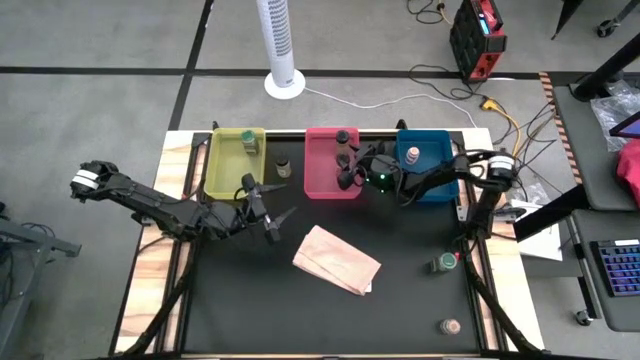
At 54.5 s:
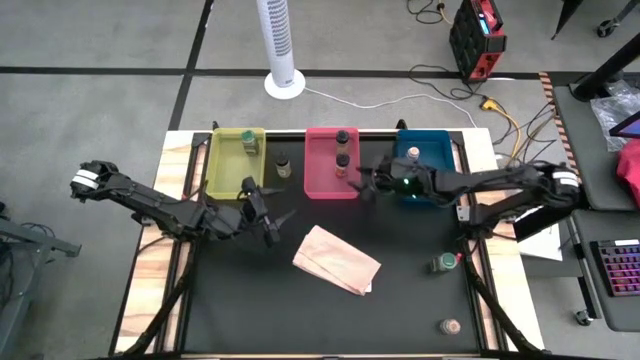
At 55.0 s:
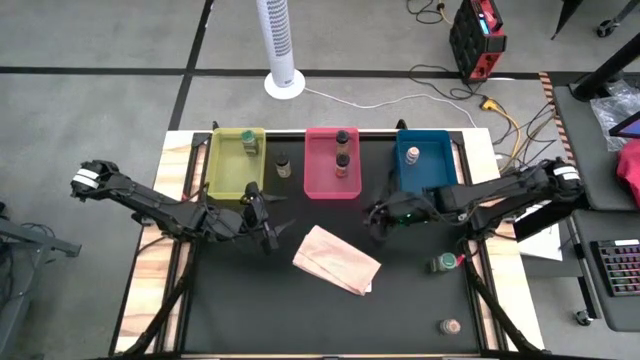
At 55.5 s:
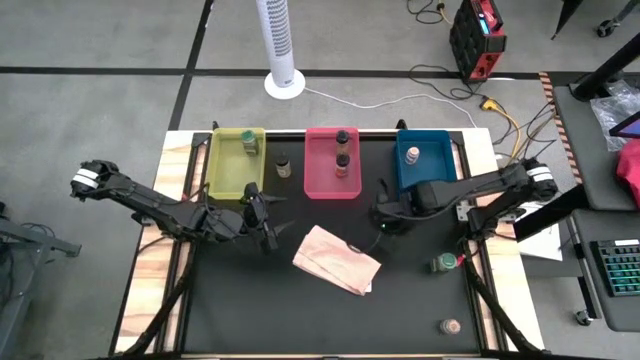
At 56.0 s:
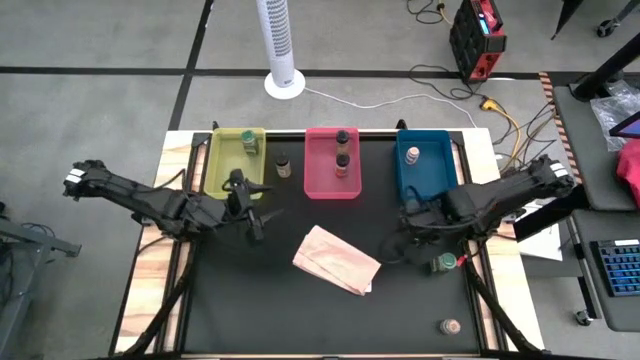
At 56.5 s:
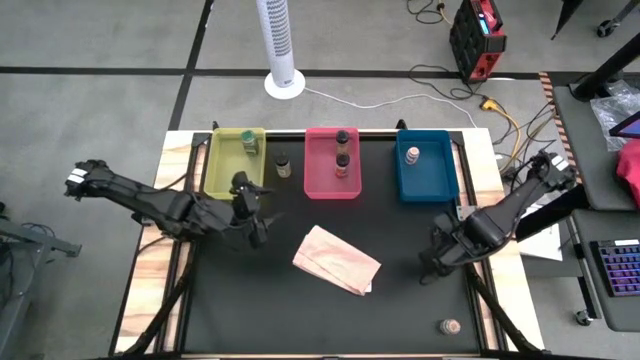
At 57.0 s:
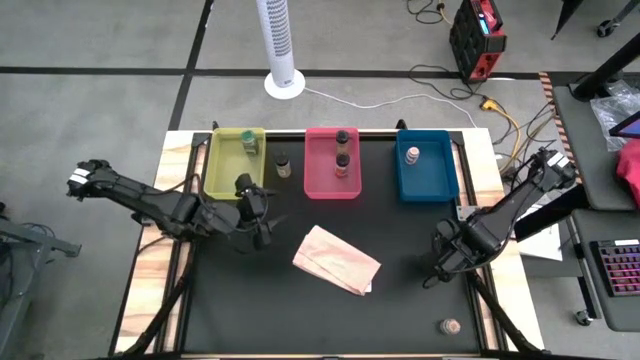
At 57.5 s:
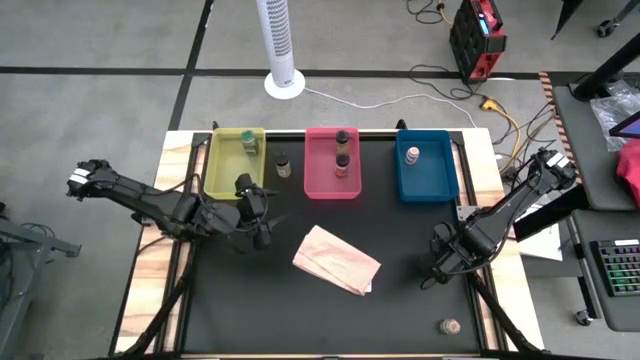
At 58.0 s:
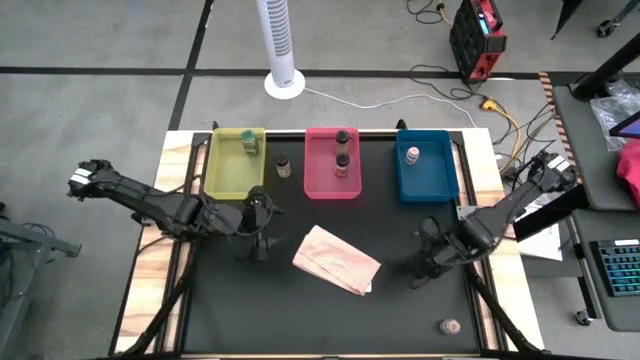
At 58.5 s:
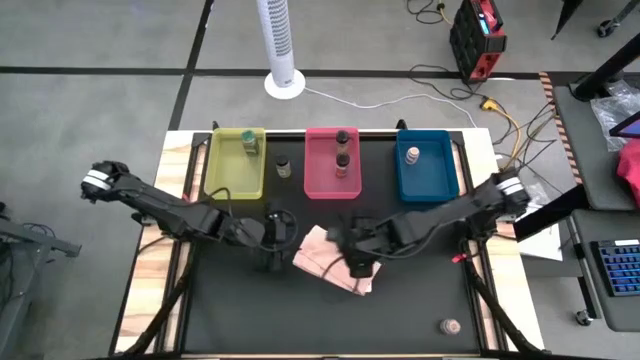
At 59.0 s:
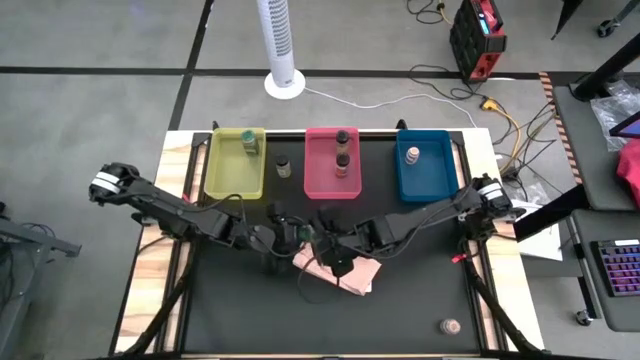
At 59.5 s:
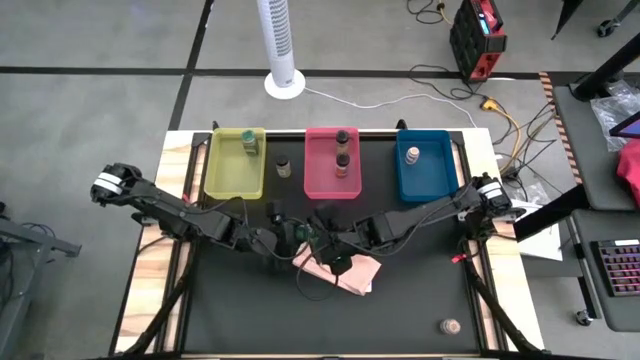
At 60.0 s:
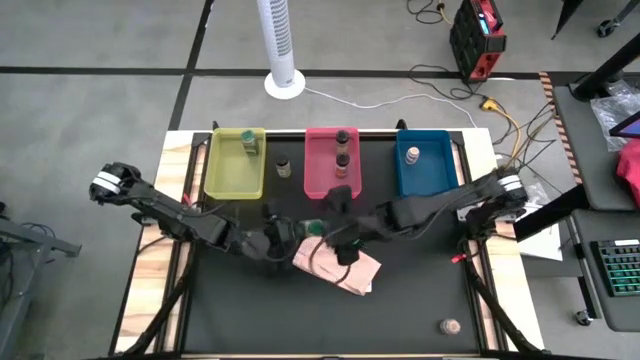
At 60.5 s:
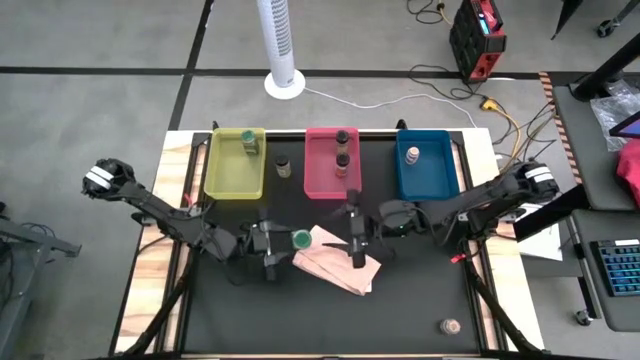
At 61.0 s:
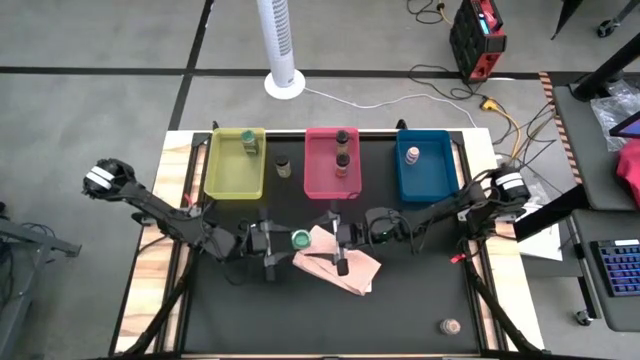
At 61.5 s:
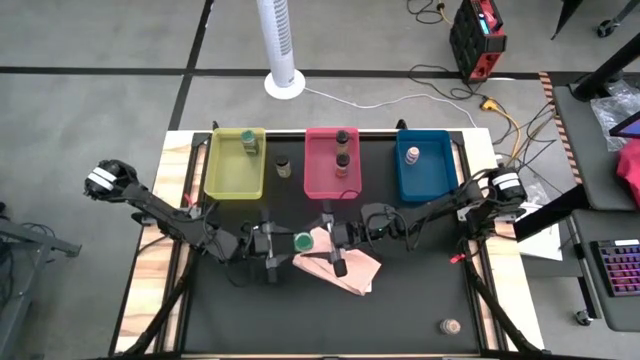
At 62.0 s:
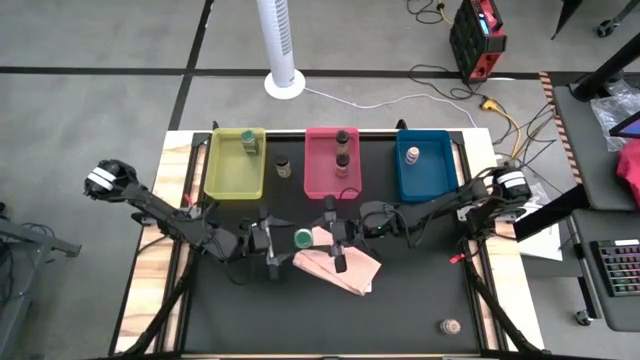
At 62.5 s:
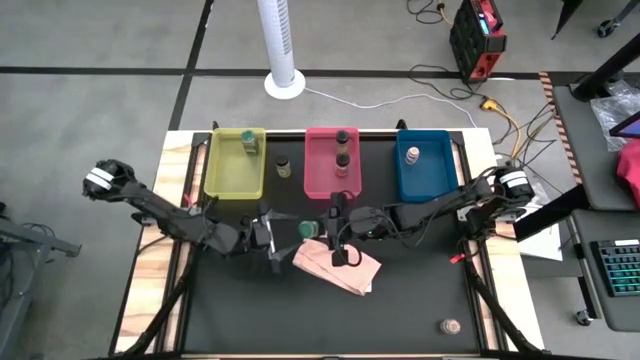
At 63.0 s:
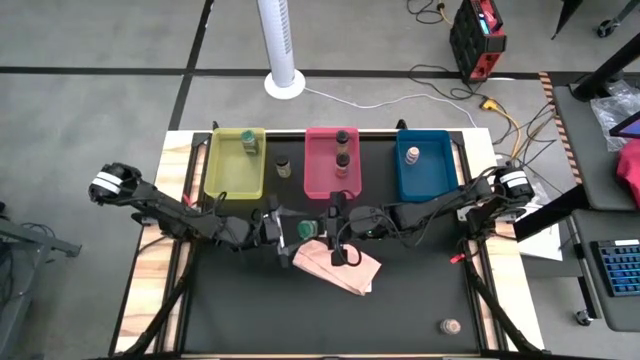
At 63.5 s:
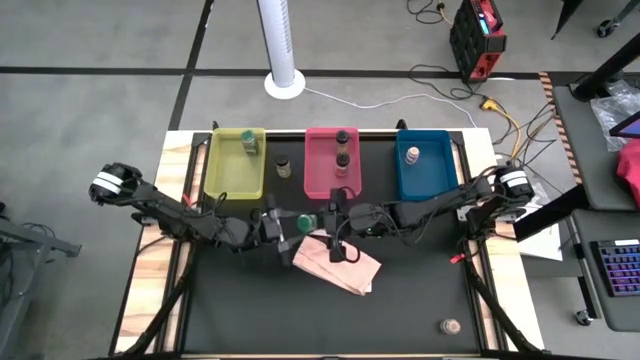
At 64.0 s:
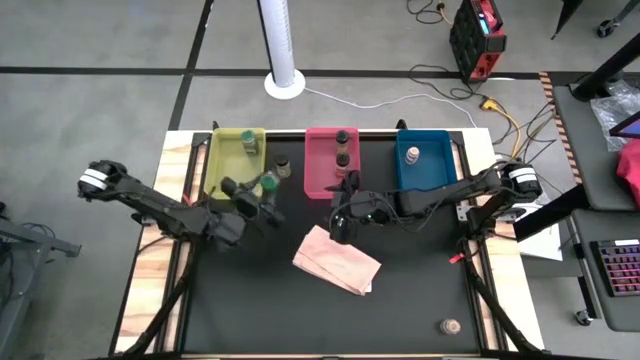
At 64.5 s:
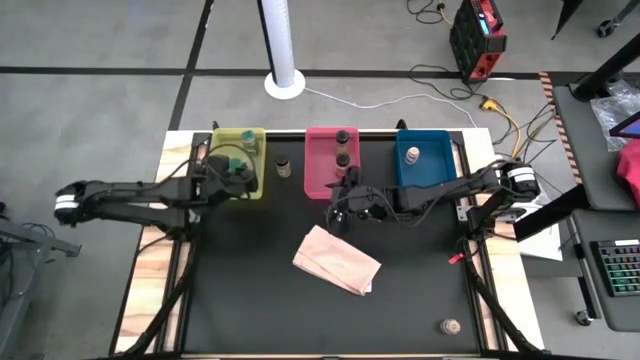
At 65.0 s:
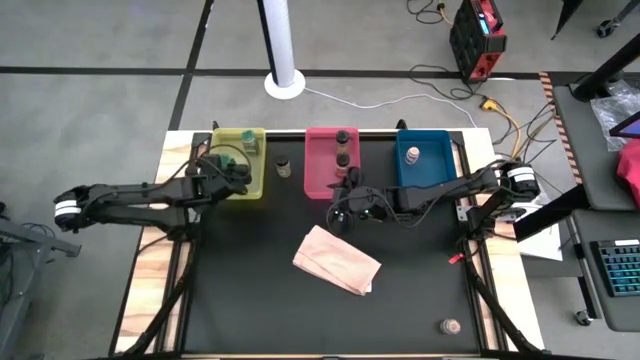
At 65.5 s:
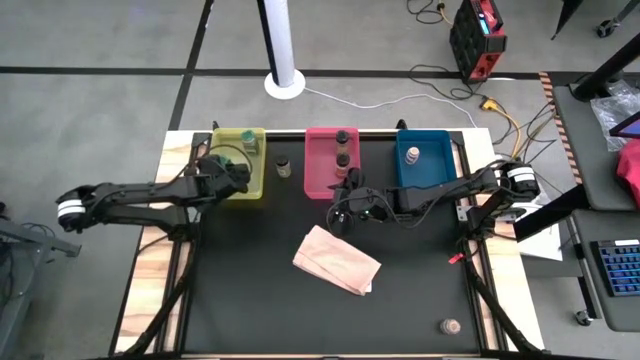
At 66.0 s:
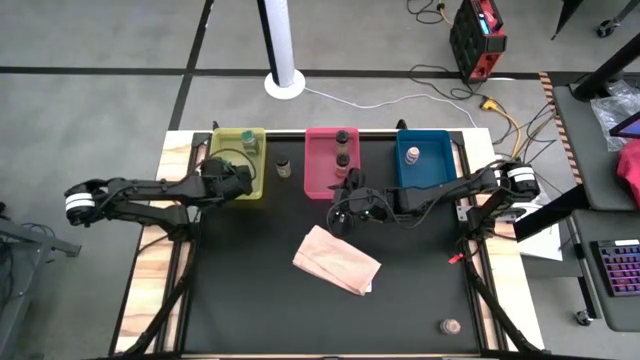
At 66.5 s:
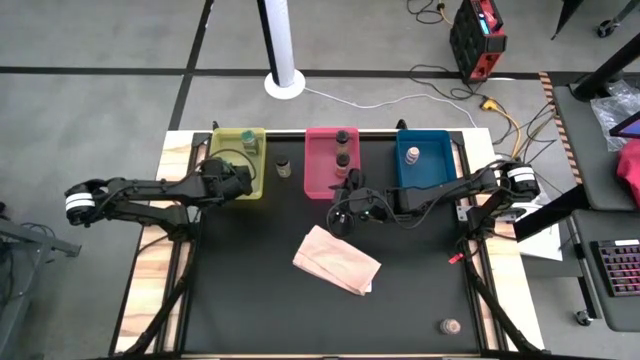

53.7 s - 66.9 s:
Task: Sort spices by type
Put the green seasoning bottle into the yellow bin

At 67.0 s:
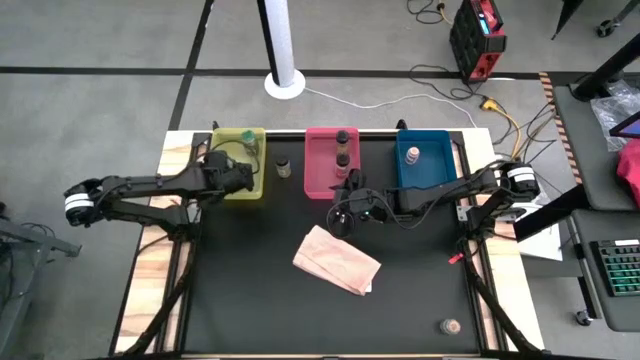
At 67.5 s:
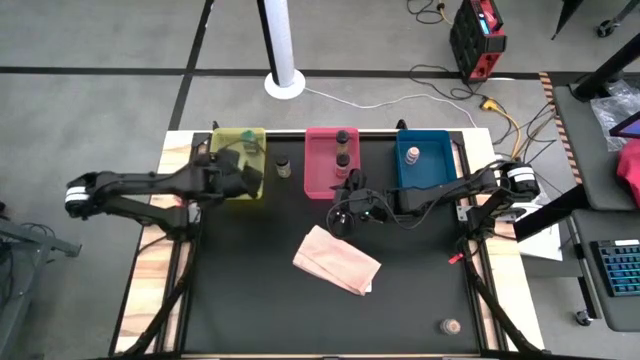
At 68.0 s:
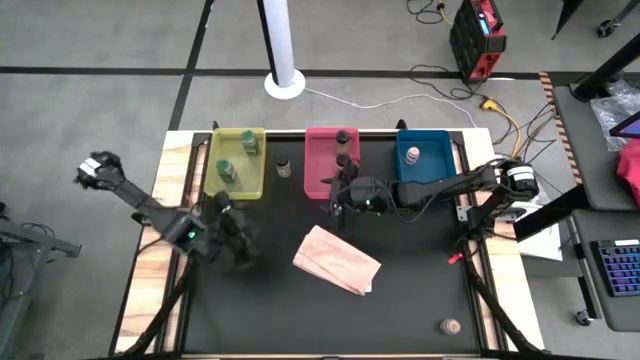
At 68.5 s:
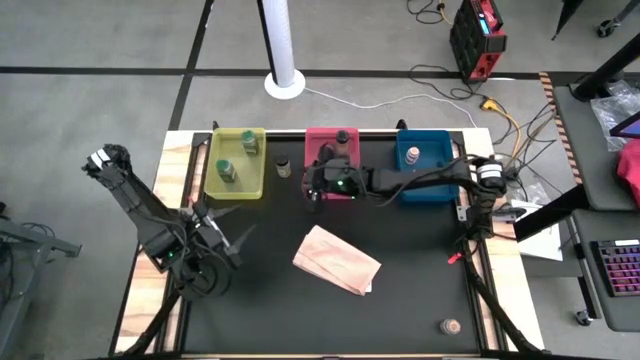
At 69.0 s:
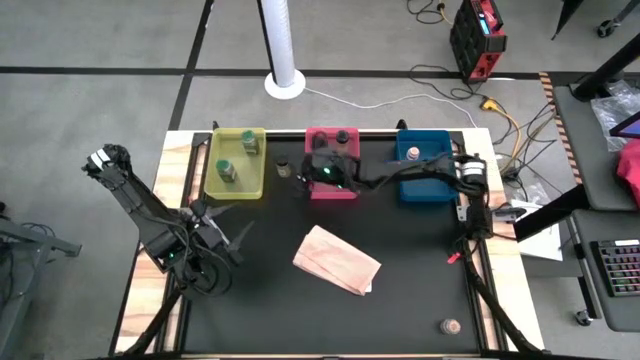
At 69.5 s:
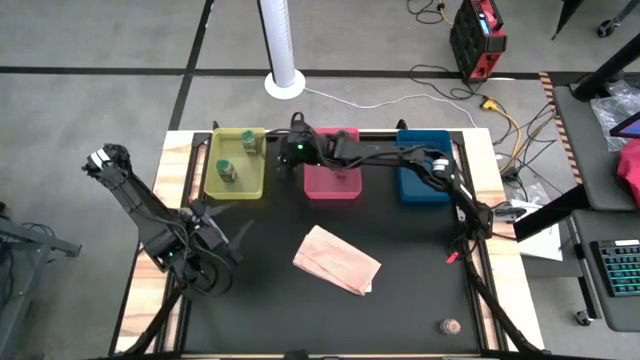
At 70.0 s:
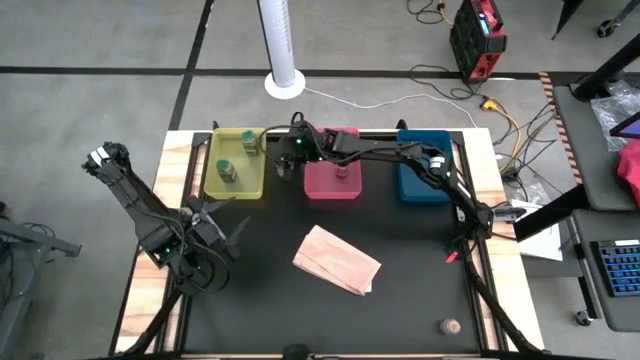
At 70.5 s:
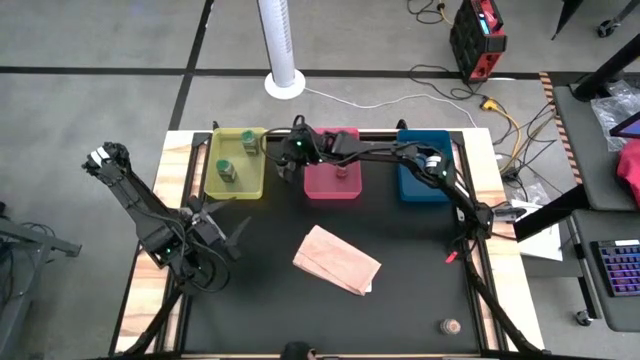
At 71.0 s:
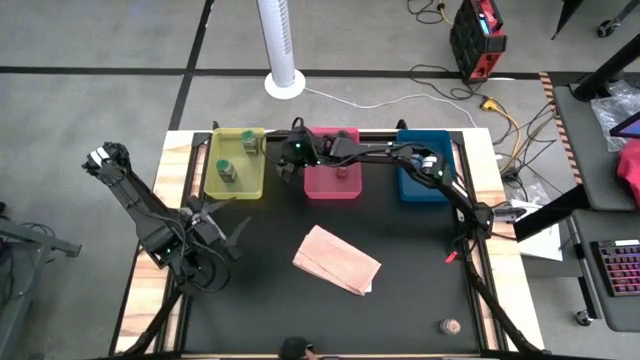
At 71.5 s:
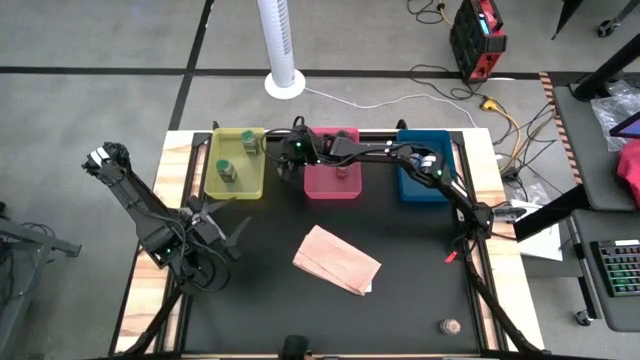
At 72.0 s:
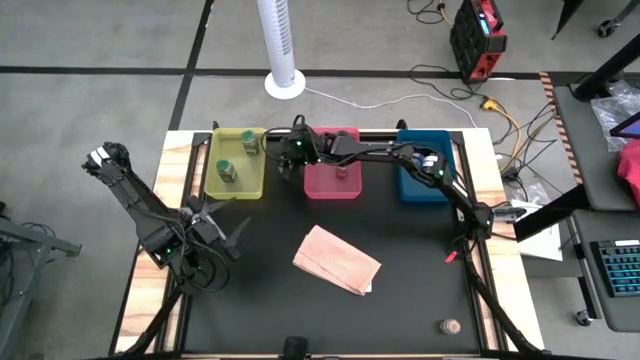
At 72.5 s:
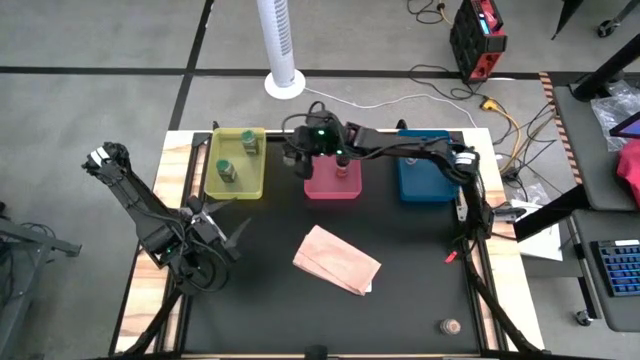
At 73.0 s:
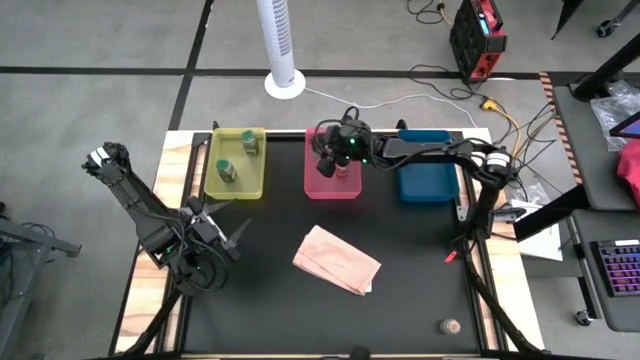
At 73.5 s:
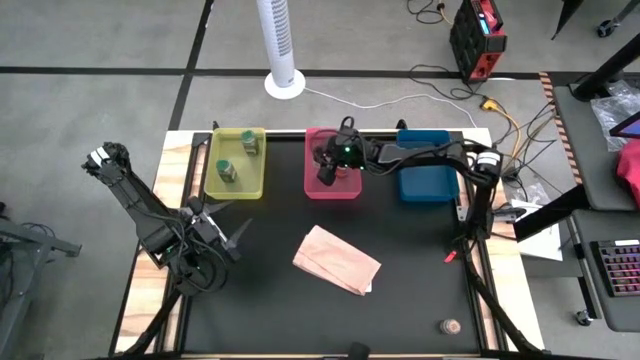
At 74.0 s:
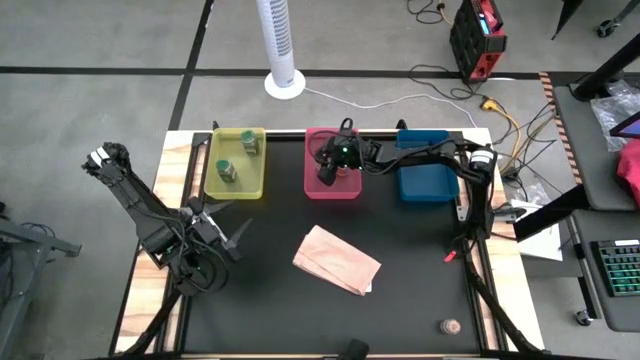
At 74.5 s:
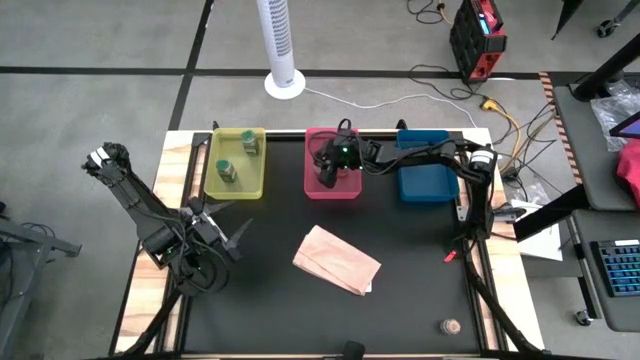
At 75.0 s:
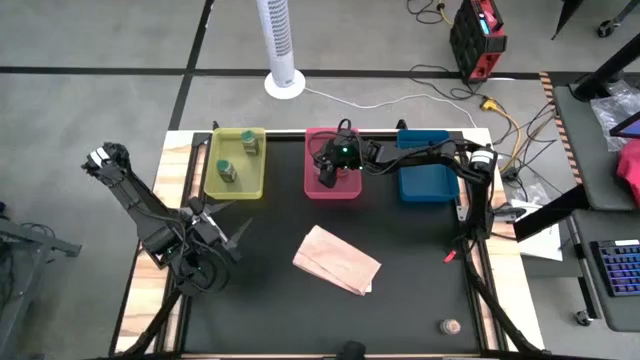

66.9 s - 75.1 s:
Put the black seasoning bottle into the pink bin

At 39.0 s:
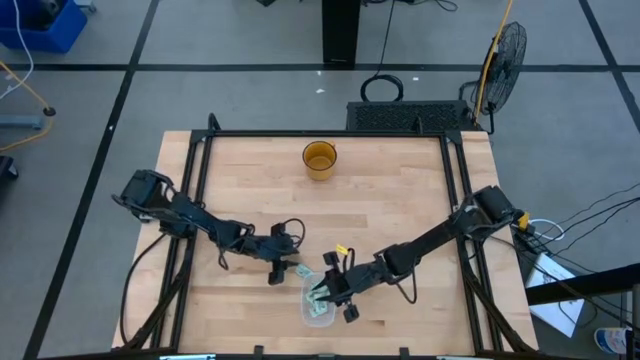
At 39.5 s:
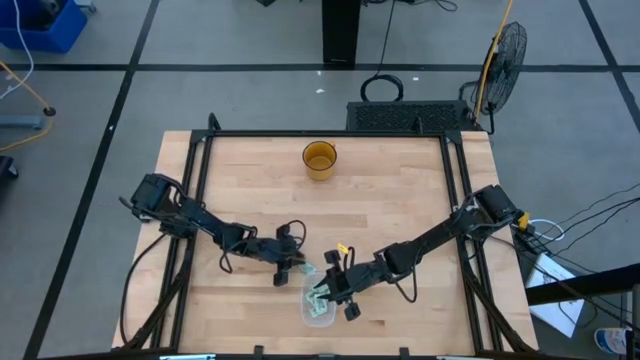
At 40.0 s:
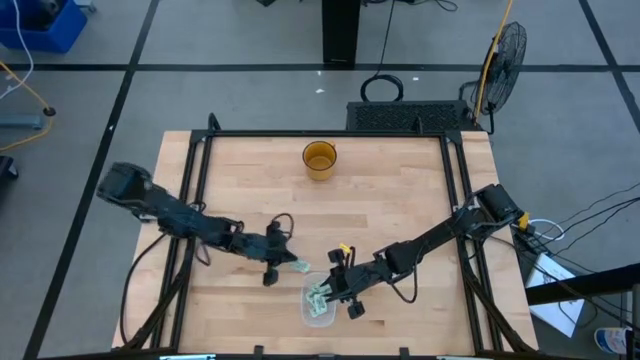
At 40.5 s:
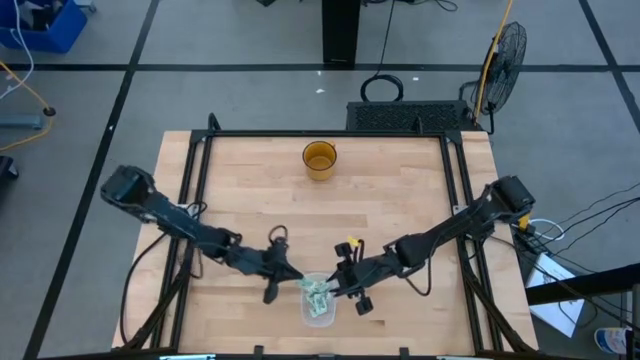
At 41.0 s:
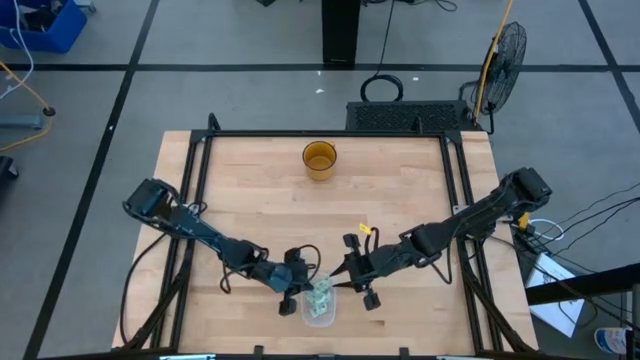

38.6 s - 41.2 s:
Task: Pick and place Stevia / Truvia into bins
Put the green stevia packet into the transparent container
